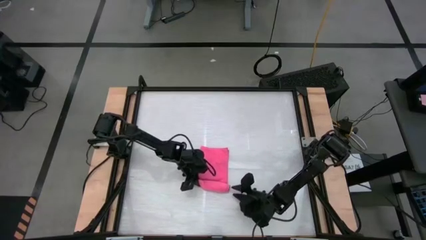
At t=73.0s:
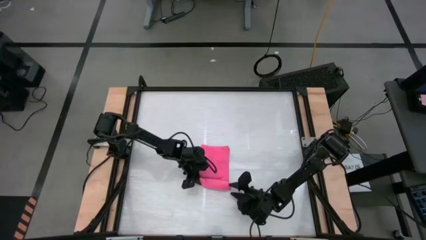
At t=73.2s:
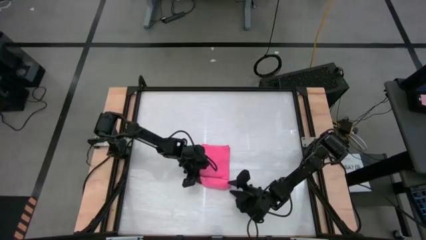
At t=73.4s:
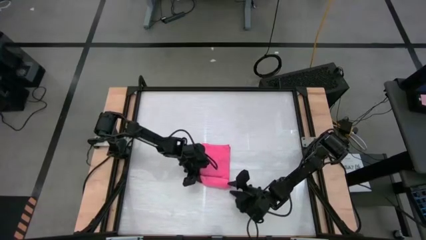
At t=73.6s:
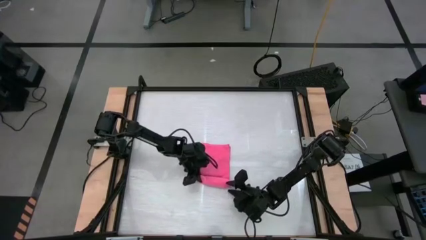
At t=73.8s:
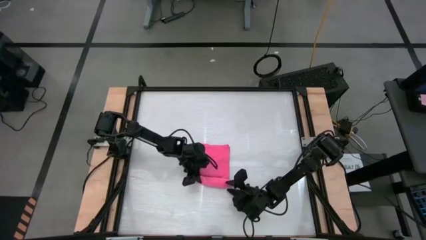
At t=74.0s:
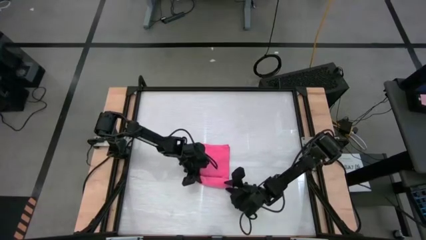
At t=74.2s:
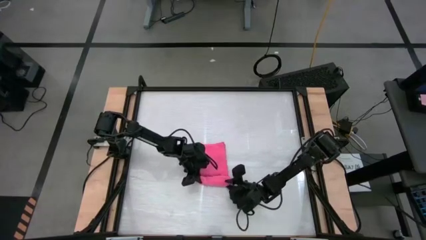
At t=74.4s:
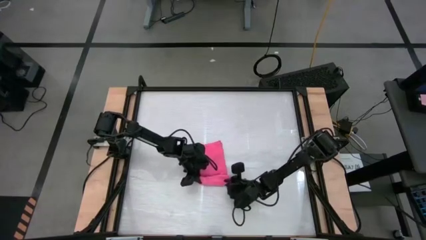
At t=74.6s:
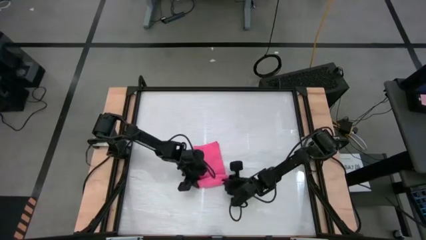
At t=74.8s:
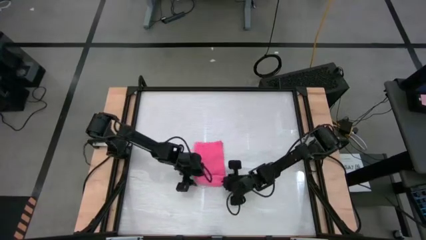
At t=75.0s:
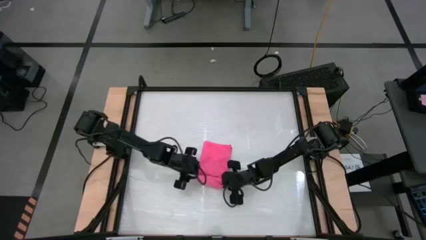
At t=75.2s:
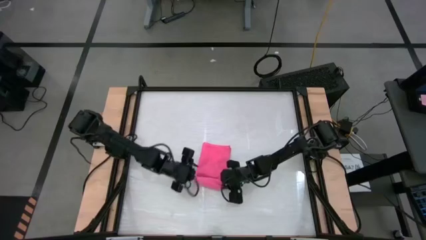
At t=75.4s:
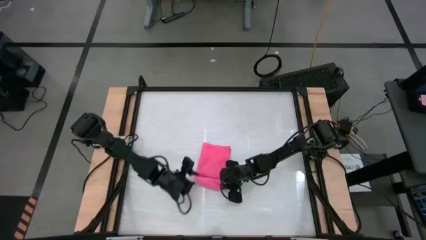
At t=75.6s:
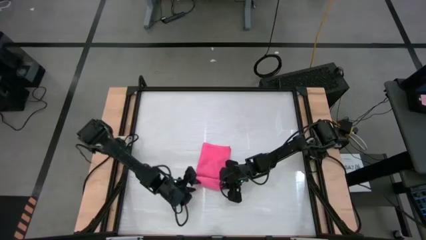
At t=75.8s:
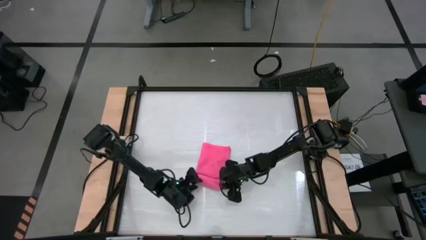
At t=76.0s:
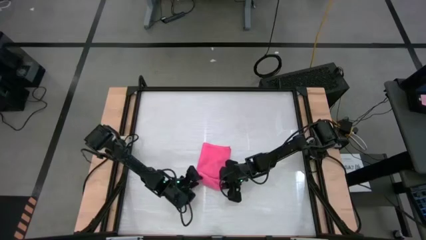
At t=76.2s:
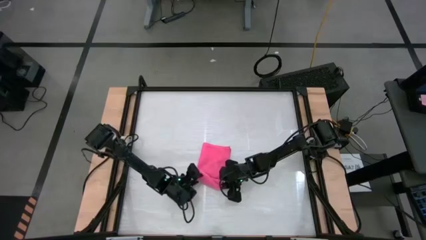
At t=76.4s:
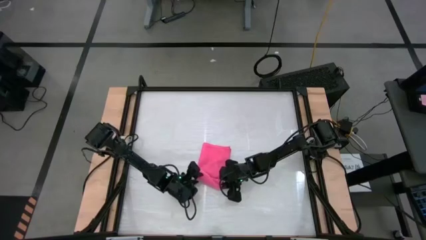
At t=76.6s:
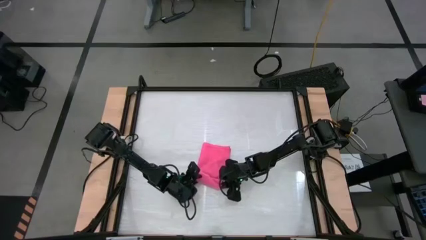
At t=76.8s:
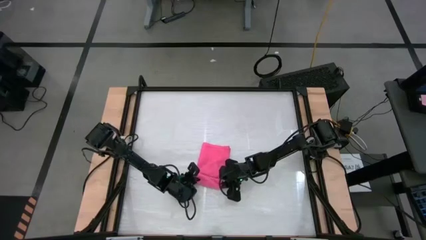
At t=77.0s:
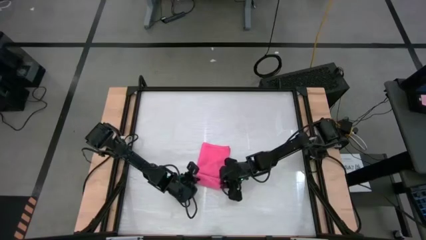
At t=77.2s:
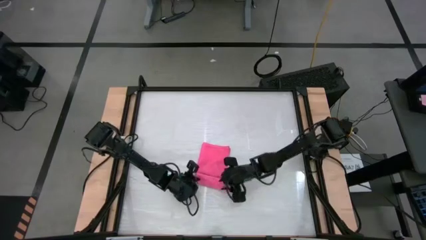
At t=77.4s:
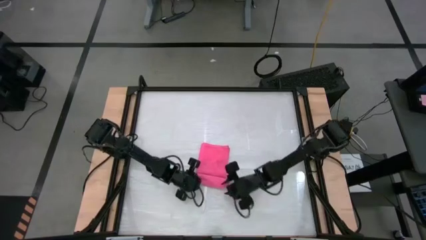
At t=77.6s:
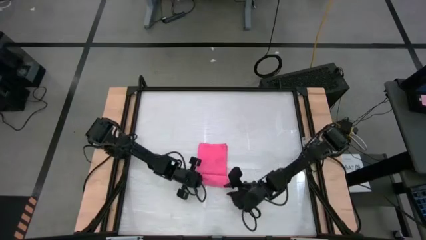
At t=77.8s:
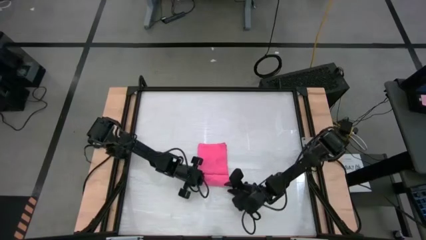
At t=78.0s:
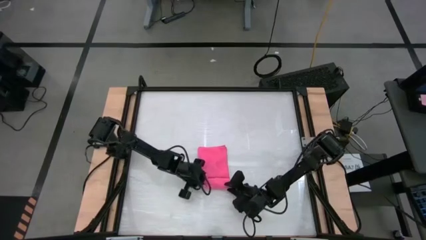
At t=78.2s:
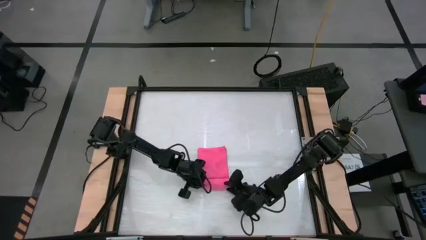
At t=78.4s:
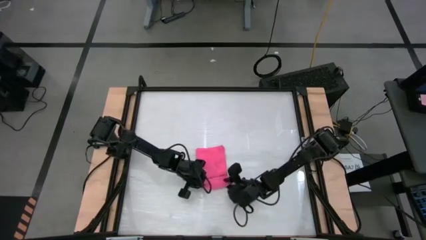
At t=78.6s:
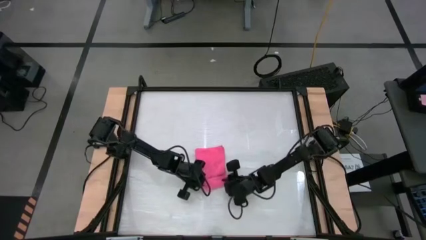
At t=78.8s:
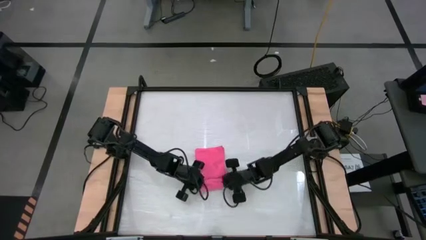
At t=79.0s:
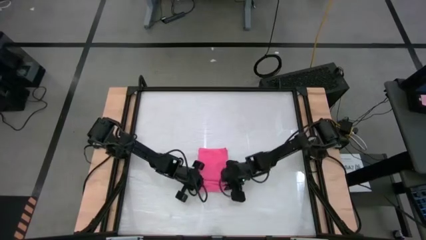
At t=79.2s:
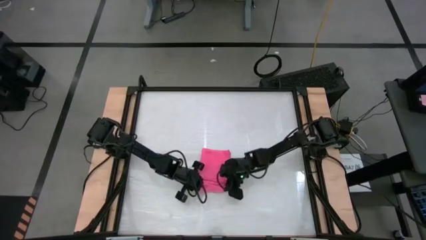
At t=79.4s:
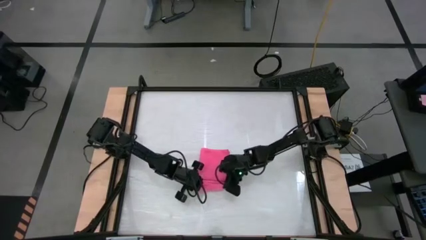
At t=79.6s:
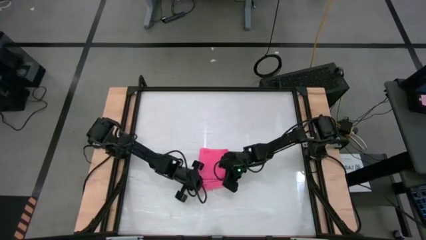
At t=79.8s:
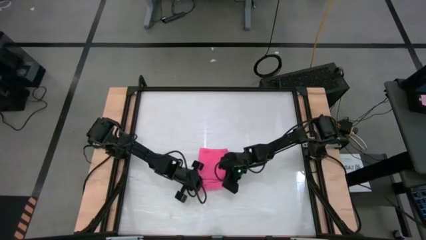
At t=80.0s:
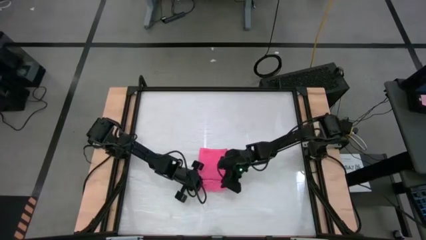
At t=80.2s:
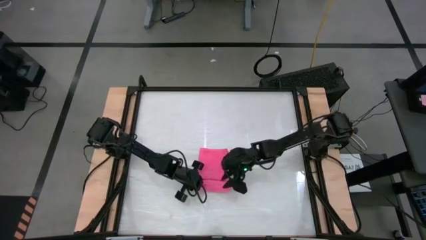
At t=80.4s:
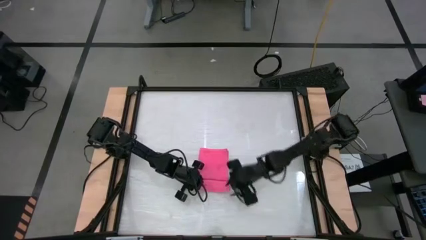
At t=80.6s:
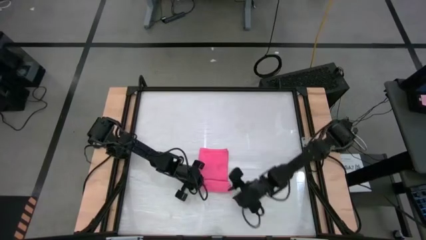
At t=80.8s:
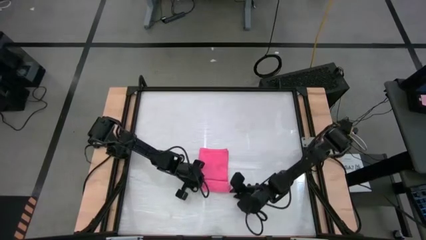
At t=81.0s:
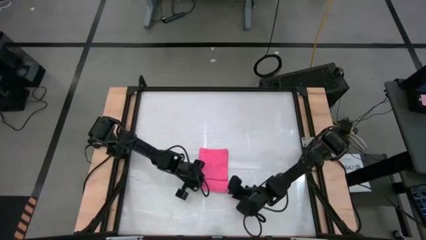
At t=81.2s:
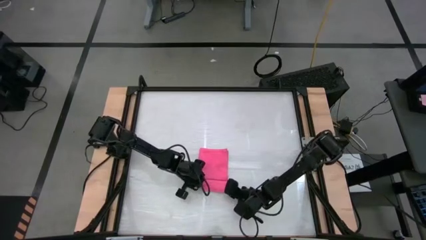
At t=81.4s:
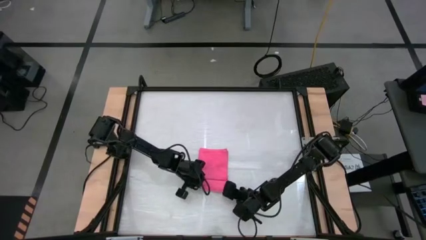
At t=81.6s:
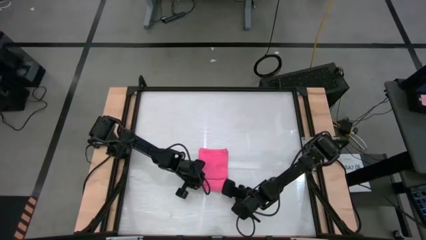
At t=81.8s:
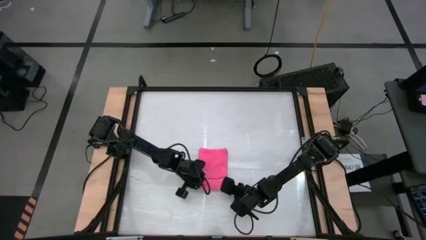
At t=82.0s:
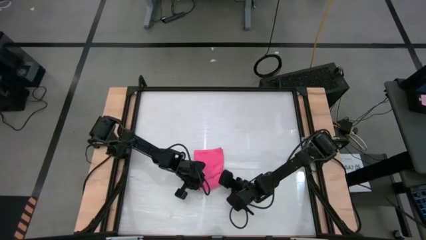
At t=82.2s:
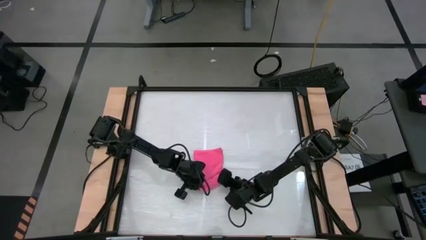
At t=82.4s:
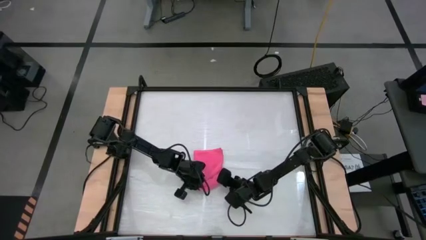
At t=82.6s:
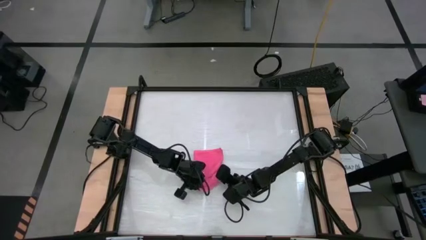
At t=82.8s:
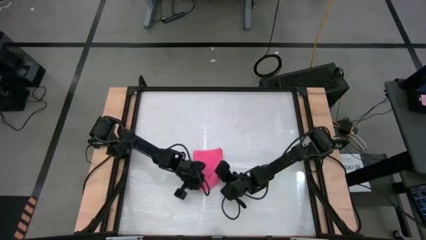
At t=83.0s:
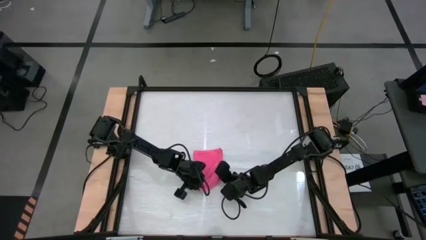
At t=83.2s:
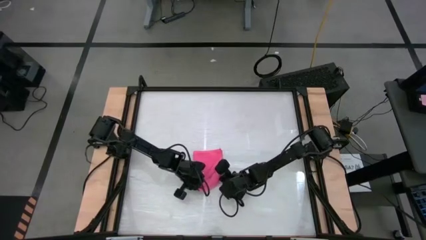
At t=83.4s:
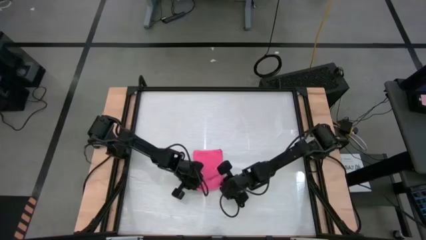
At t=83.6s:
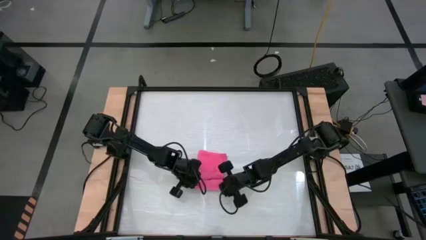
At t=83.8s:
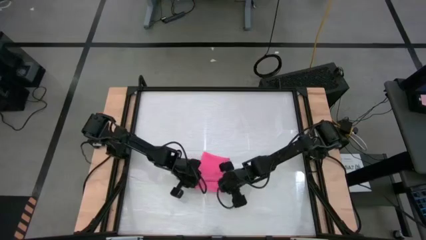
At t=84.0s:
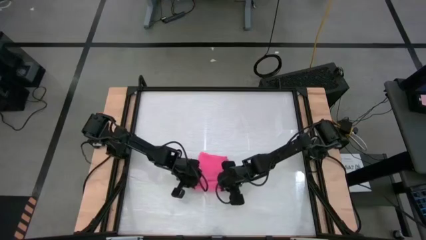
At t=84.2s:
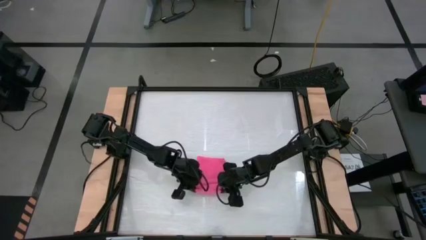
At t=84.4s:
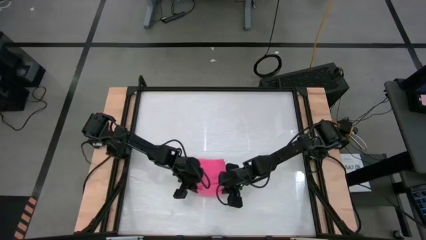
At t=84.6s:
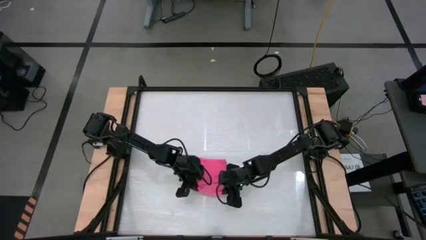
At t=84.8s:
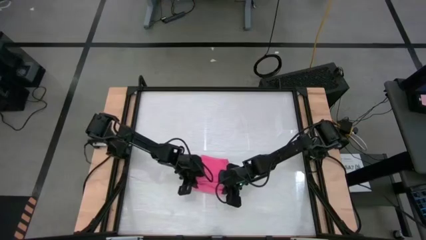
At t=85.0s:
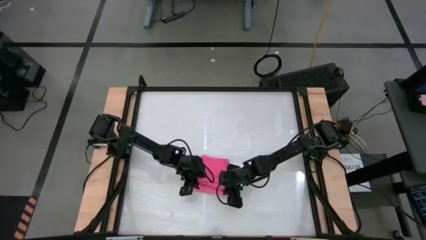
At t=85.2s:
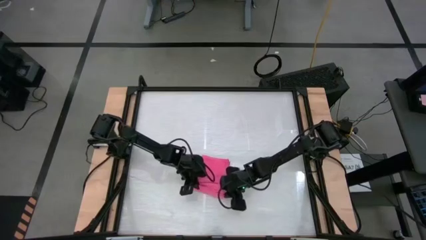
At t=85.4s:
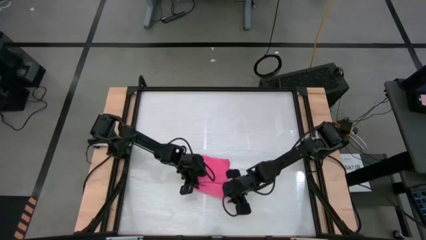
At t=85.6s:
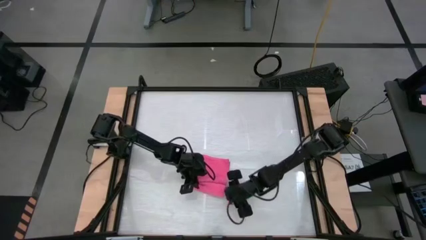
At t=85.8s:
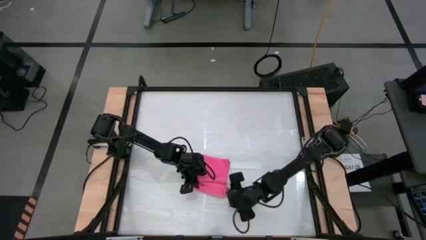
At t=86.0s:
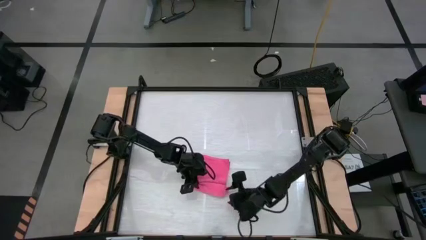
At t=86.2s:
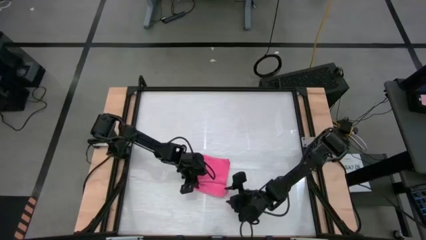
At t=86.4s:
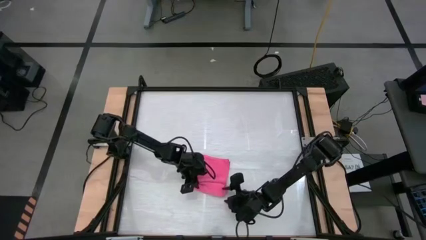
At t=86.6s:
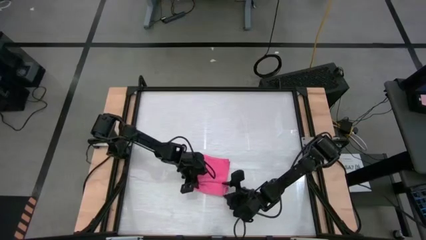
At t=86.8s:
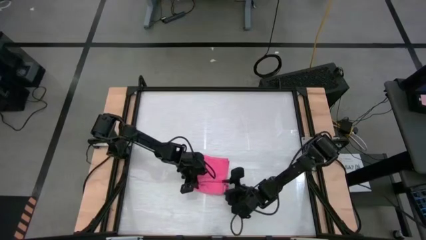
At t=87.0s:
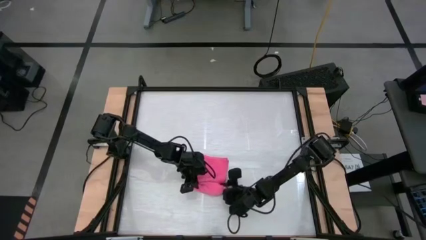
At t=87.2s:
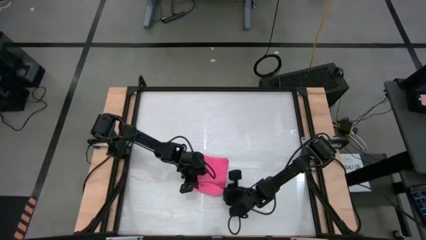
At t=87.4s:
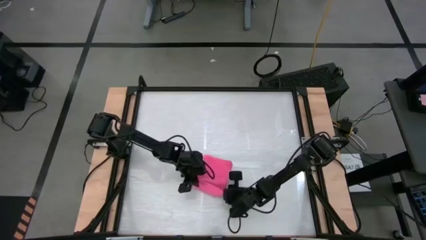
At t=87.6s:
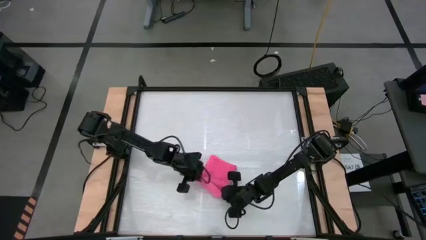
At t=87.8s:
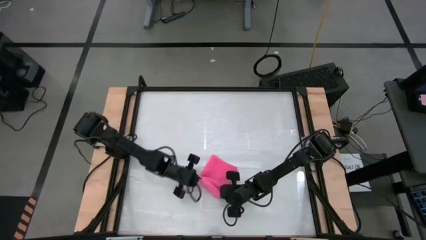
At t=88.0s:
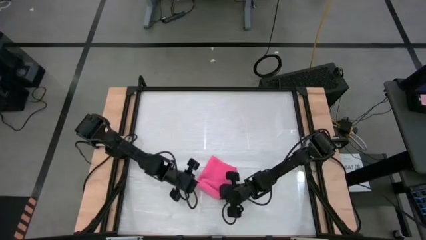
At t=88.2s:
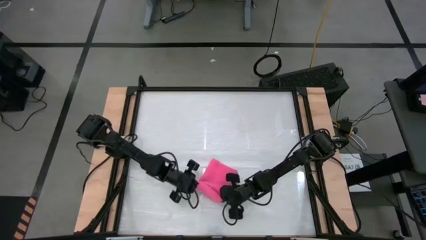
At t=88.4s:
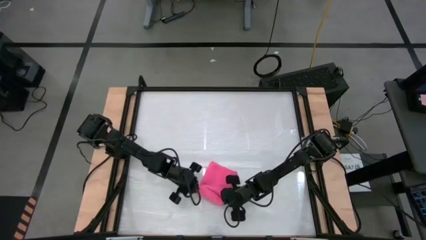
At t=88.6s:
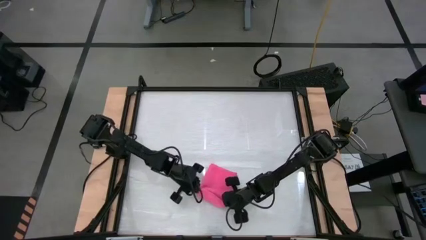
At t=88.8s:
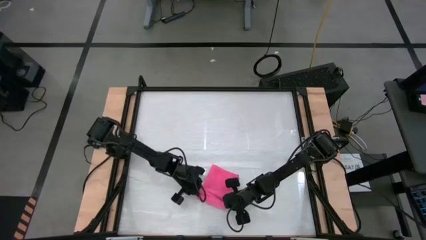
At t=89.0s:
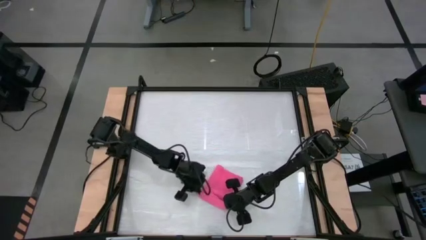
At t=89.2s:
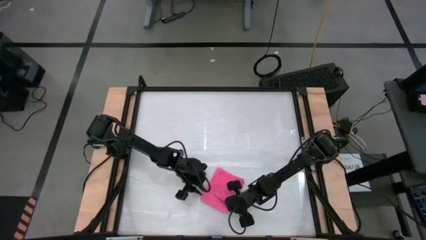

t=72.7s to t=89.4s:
Task: Roll towel
Roll the pink towel
